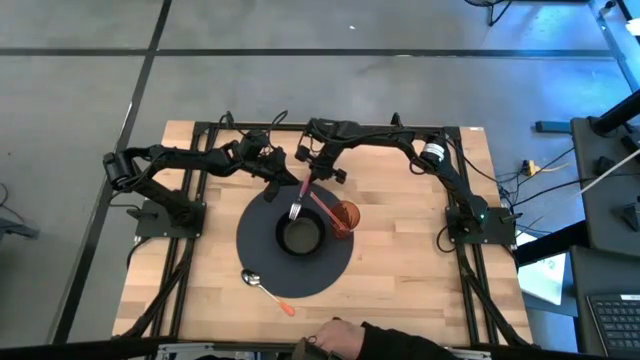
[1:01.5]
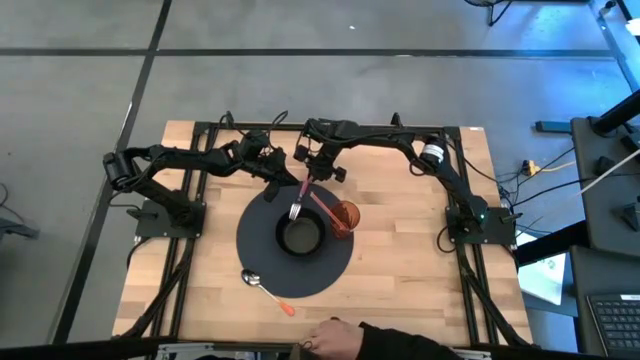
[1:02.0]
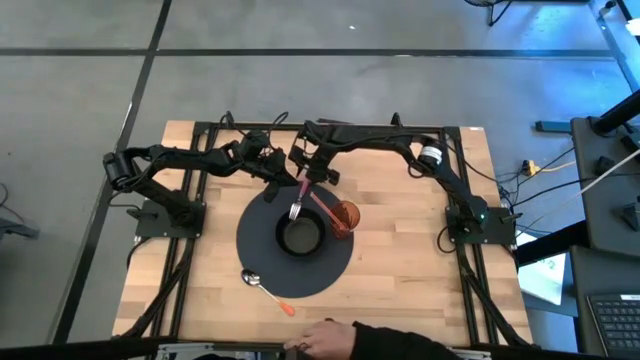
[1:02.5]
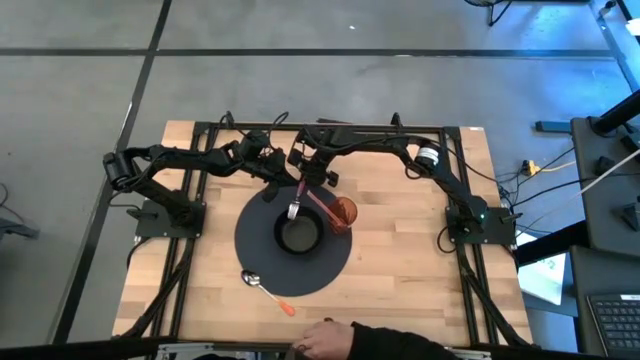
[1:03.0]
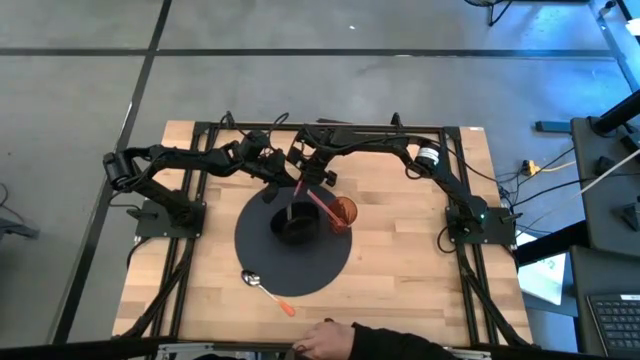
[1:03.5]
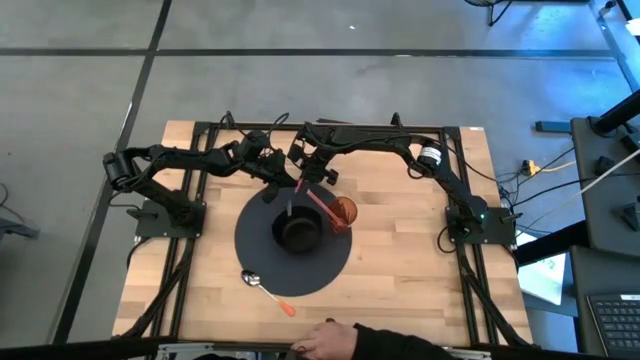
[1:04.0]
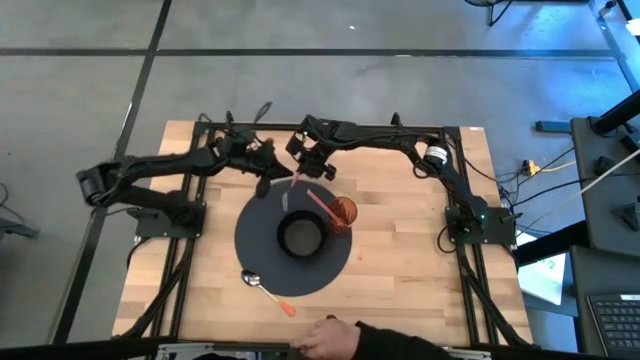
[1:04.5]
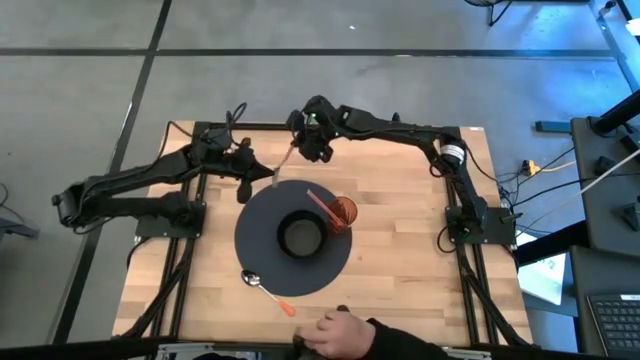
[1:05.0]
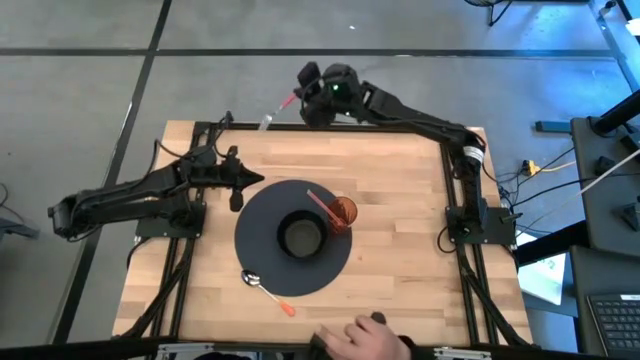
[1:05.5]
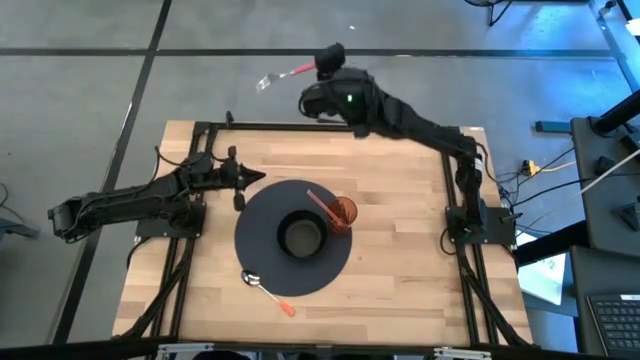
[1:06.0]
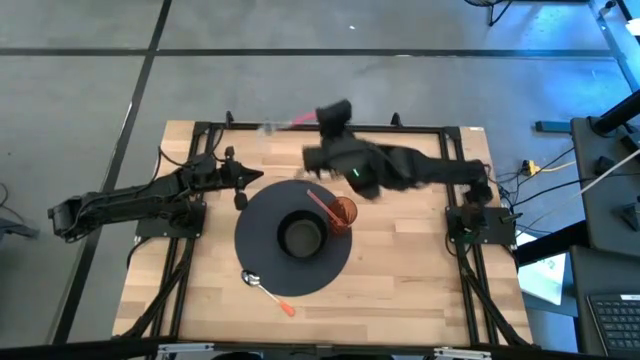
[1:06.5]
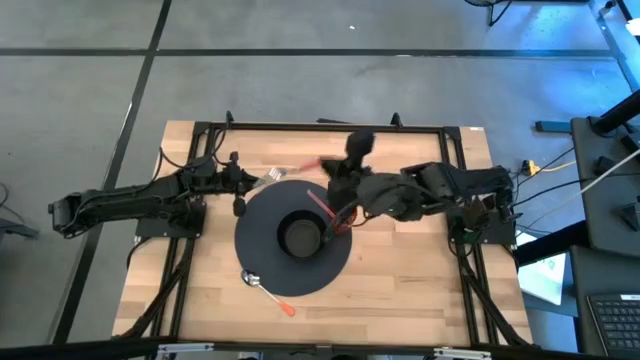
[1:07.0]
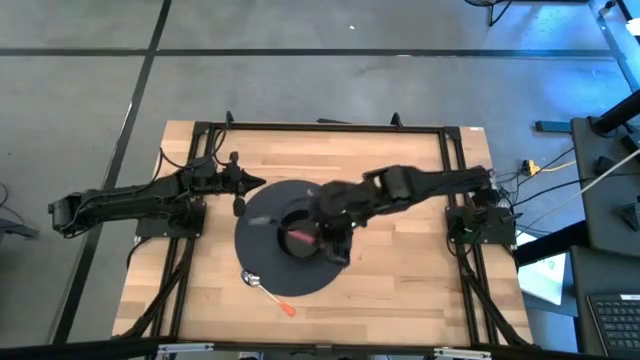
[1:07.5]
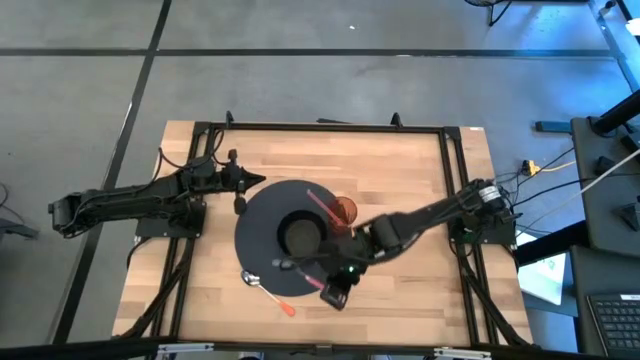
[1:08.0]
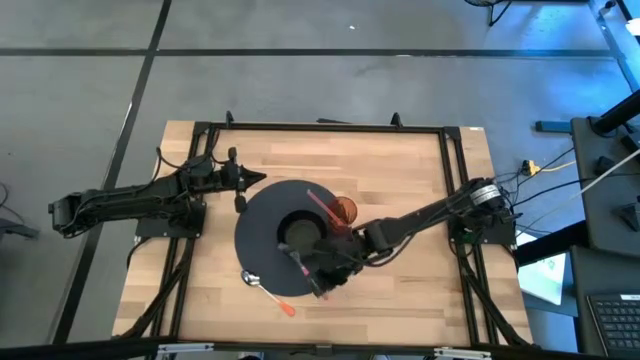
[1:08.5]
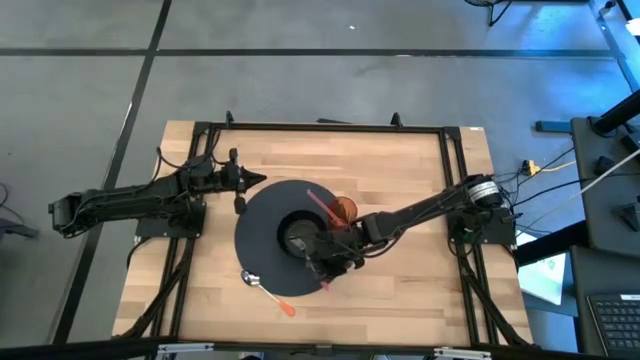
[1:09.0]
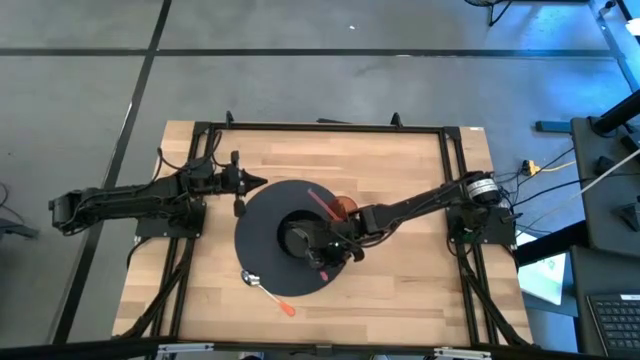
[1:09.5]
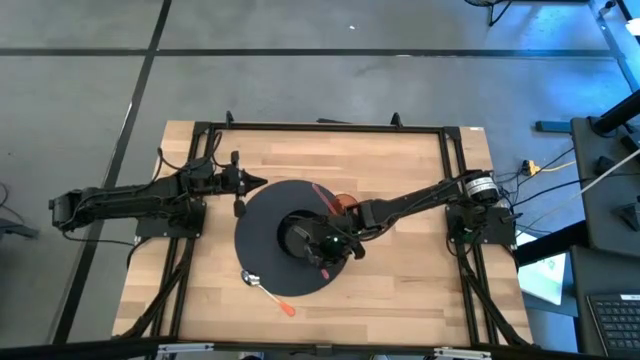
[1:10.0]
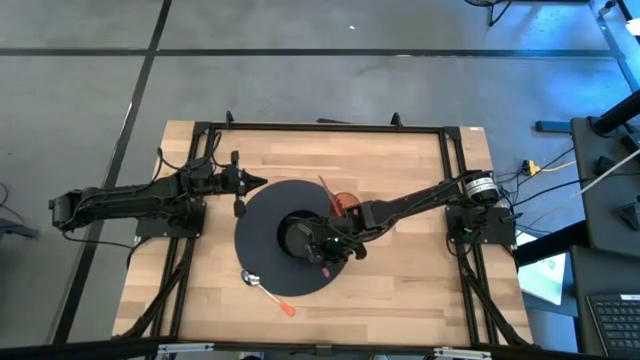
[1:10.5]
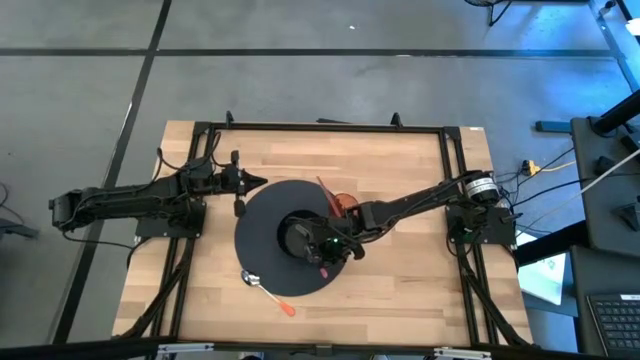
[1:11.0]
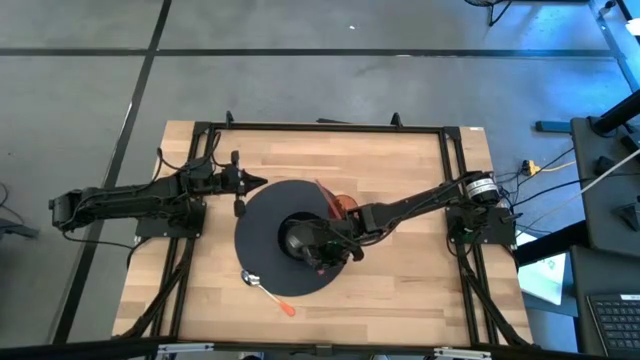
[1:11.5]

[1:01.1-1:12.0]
Task: Pick & Place Utensil
Put the pink fork into the black bowl

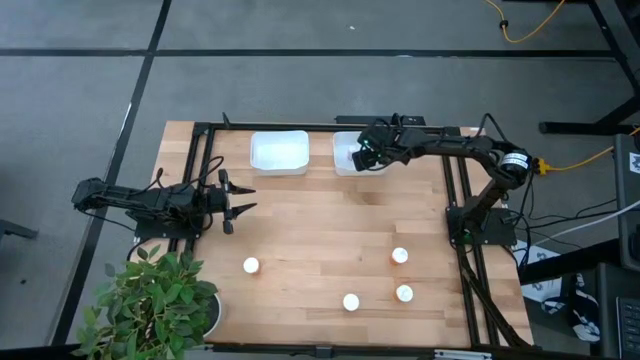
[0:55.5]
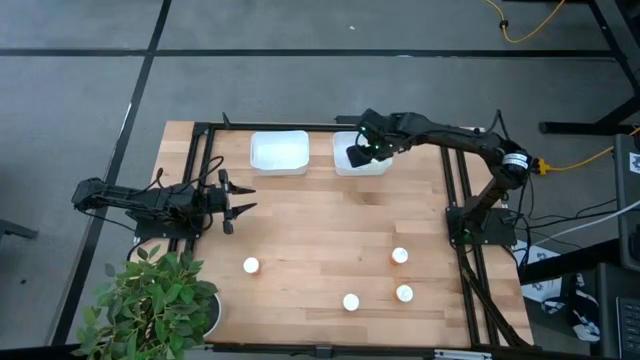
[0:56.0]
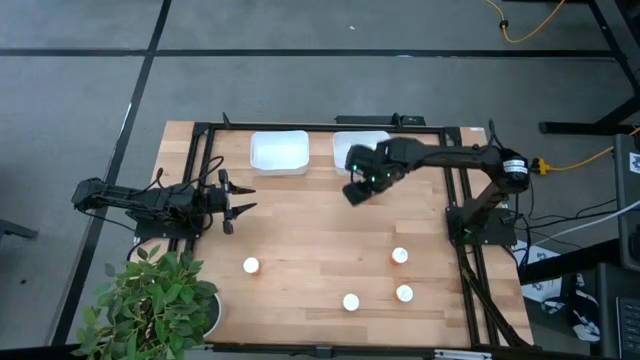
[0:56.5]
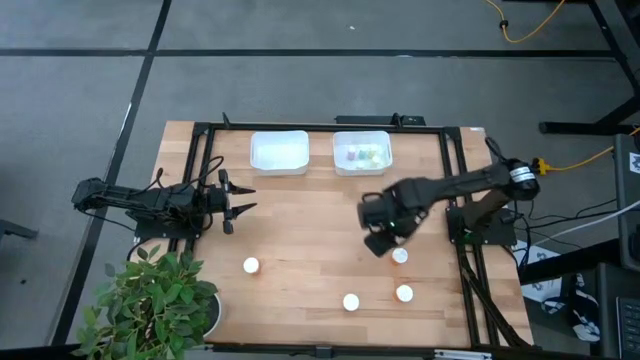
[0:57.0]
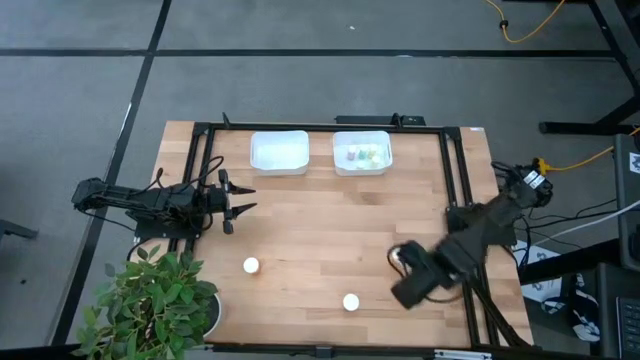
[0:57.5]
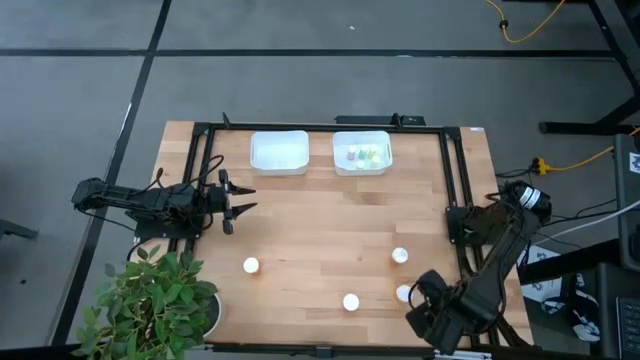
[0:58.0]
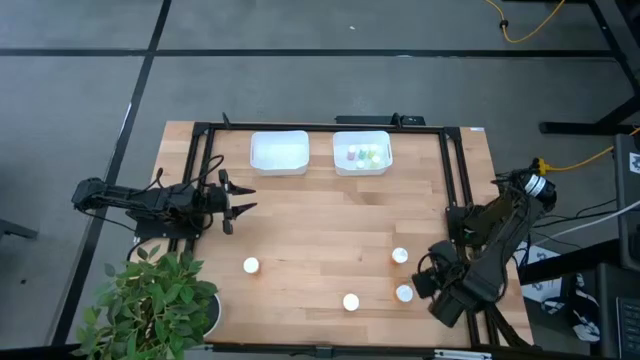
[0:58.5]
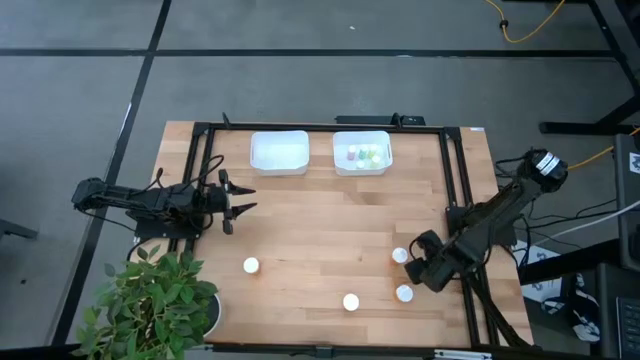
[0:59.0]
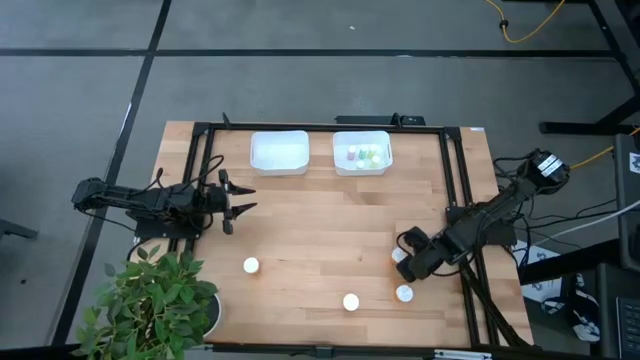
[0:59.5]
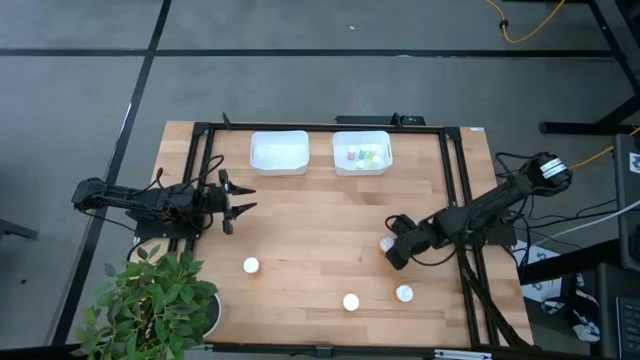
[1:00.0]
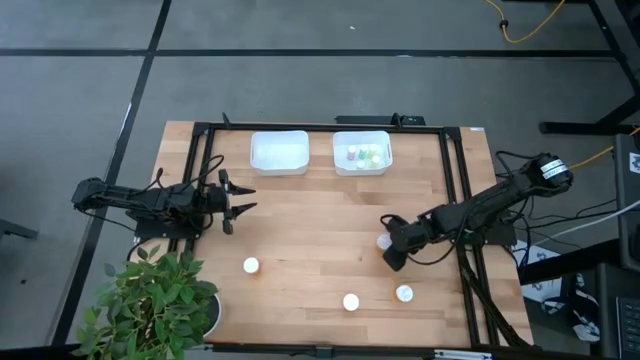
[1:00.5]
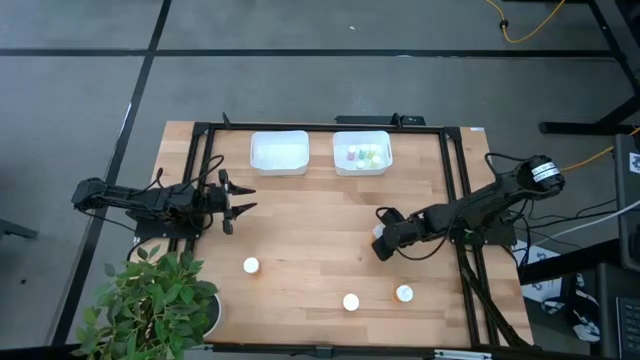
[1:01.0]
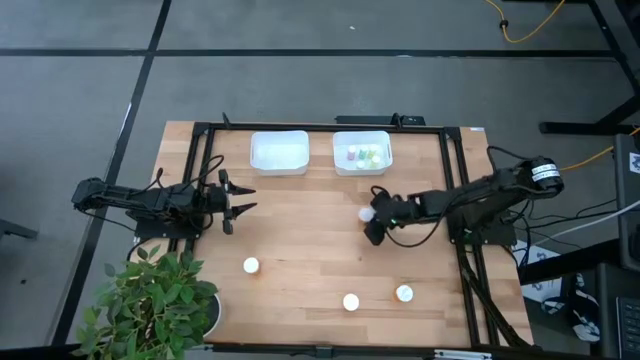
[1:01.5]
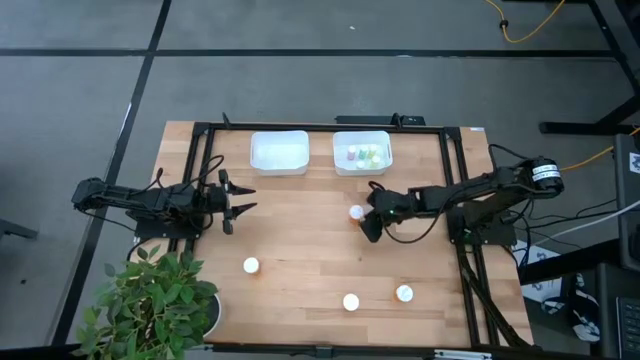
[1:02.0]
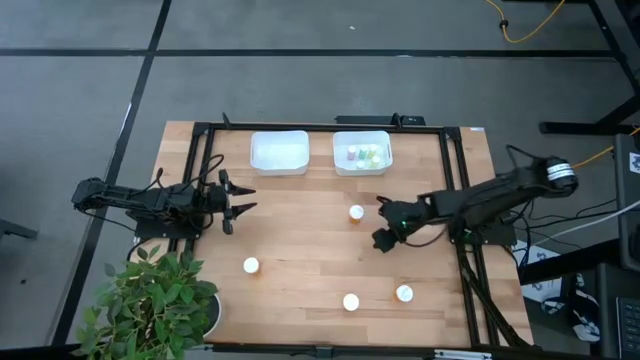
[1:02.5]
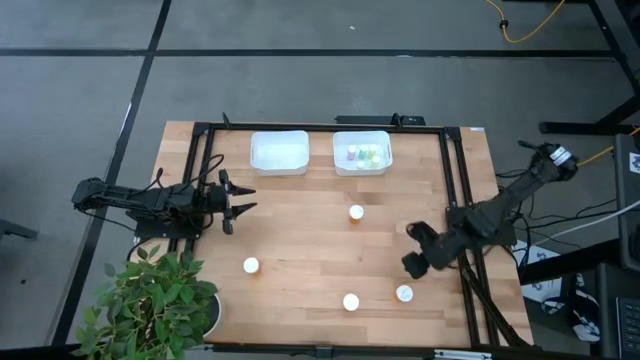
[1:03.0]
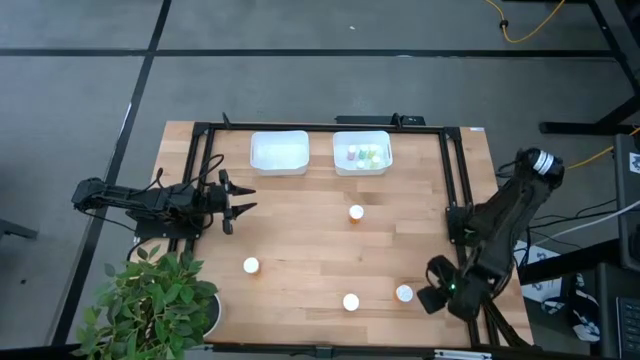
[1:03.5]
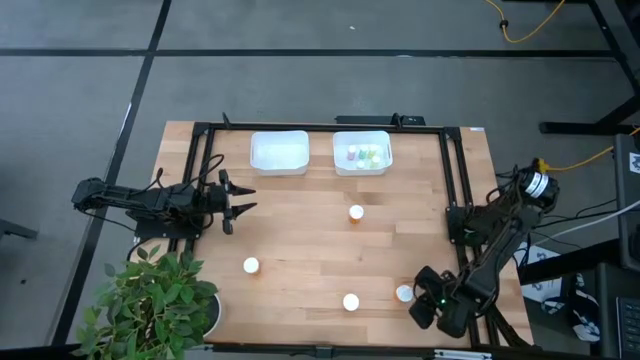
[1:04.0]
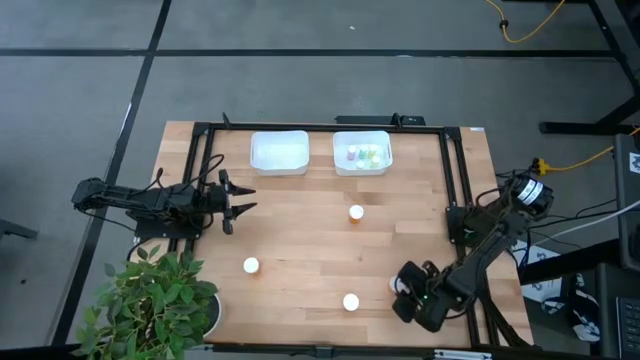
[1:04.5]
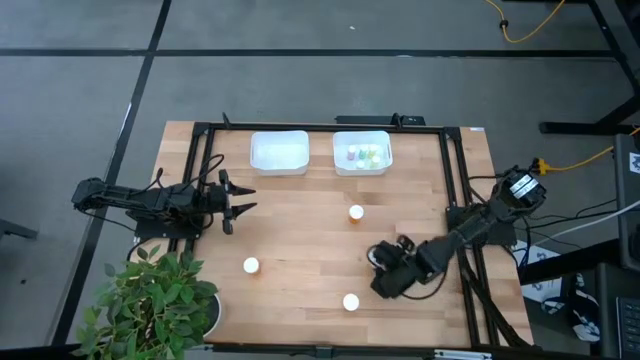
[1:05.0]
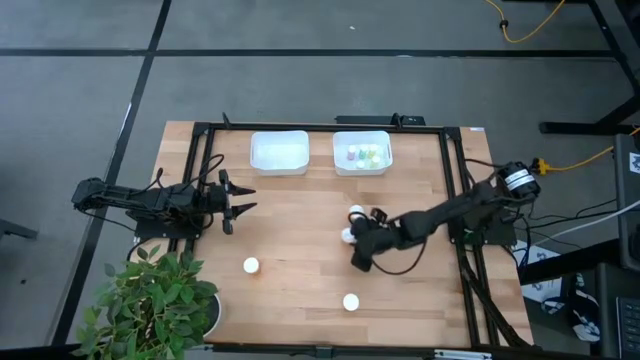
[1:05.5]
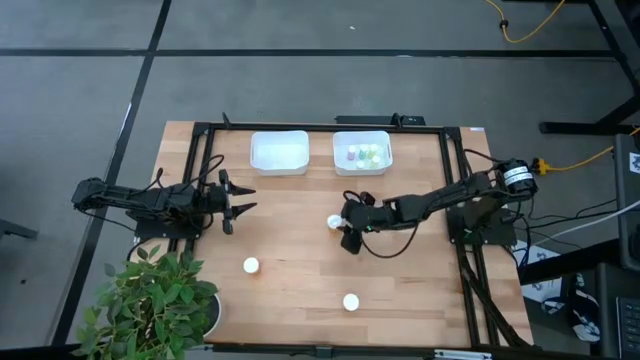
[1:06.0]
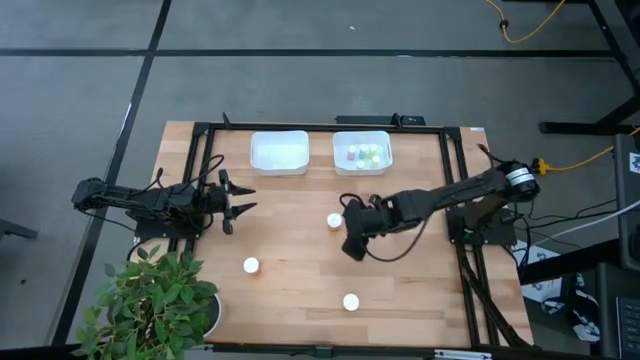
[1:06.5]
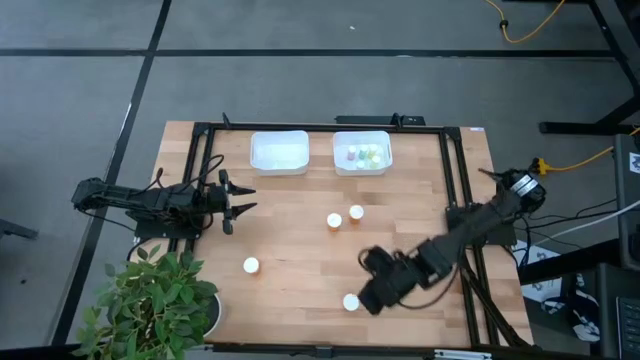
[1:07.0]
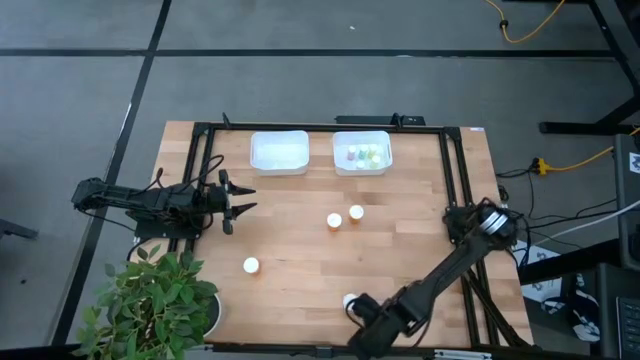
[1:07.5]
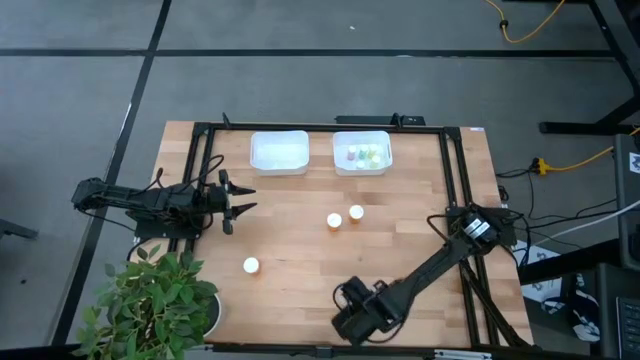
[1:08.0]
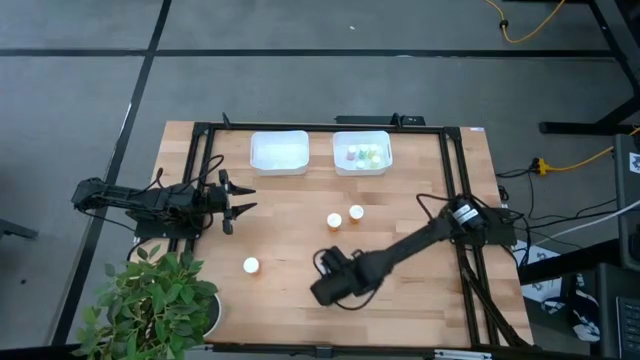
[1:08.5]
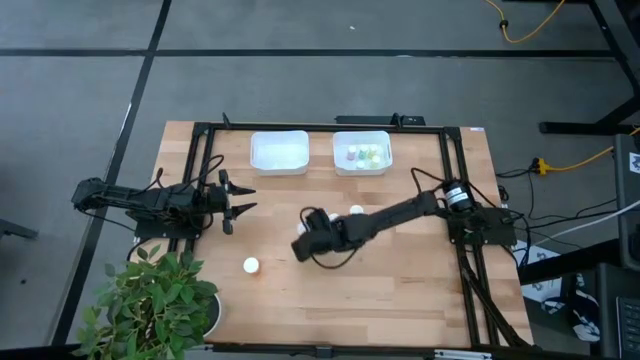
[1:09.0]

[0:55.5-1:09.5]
Task: Pick and place medicine bottles into bin by pill shape (circle, oval)
Prepare the orange bottles
